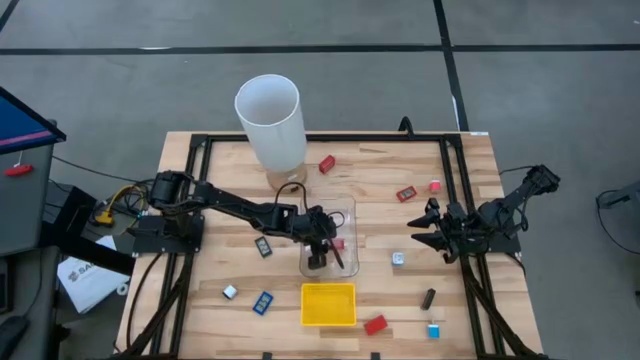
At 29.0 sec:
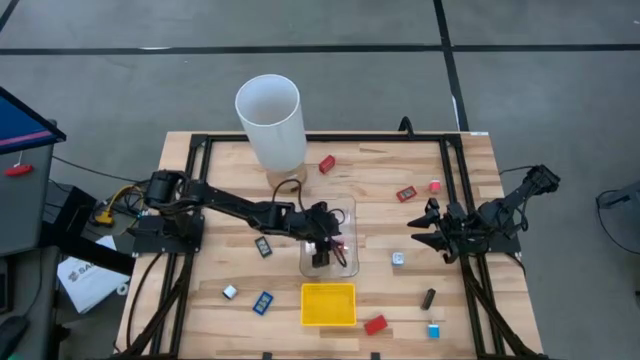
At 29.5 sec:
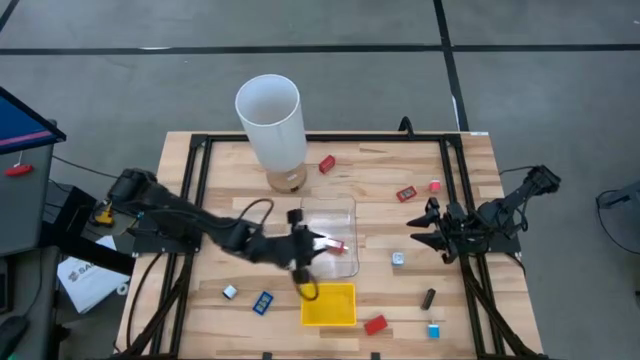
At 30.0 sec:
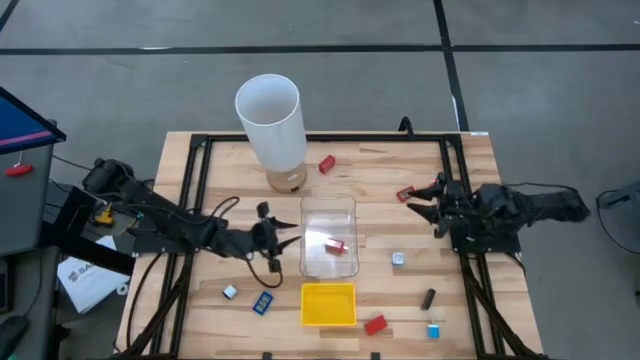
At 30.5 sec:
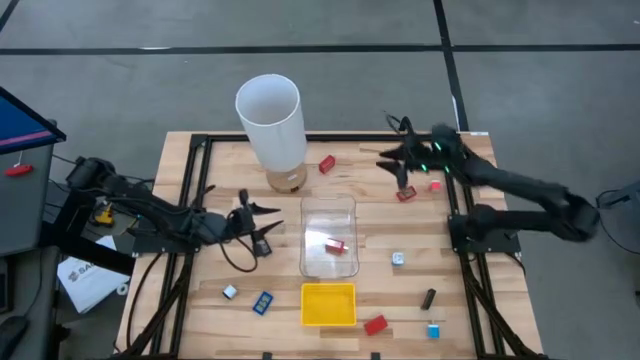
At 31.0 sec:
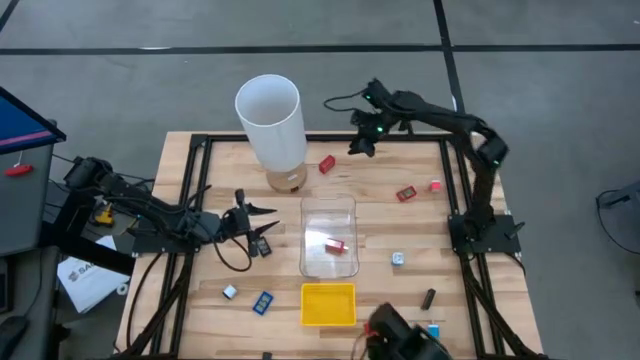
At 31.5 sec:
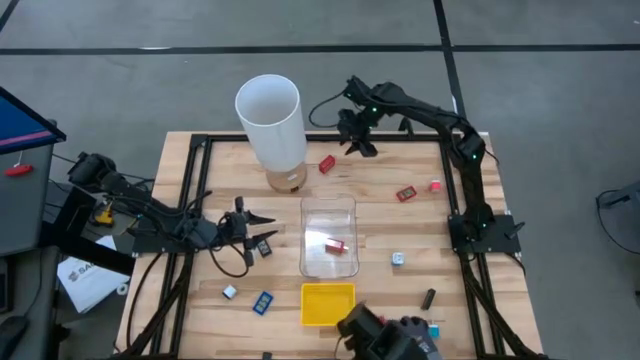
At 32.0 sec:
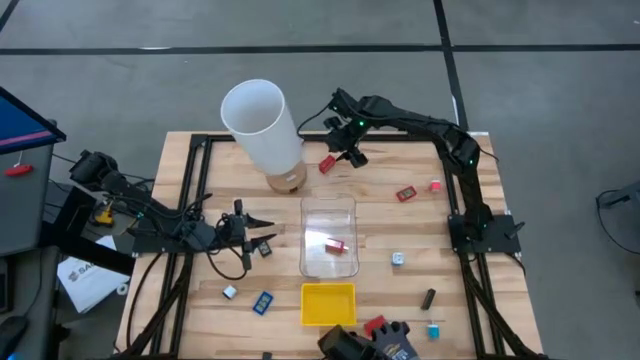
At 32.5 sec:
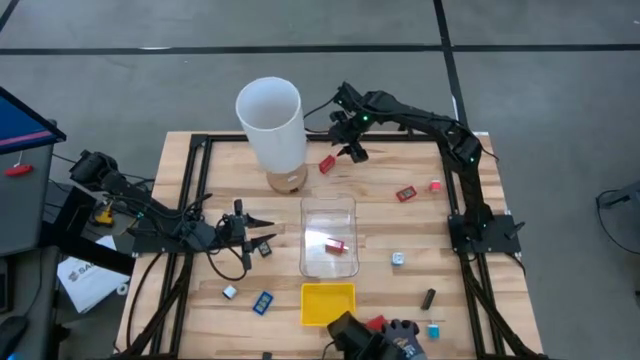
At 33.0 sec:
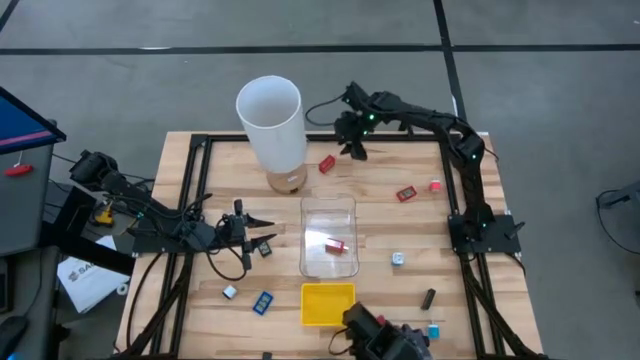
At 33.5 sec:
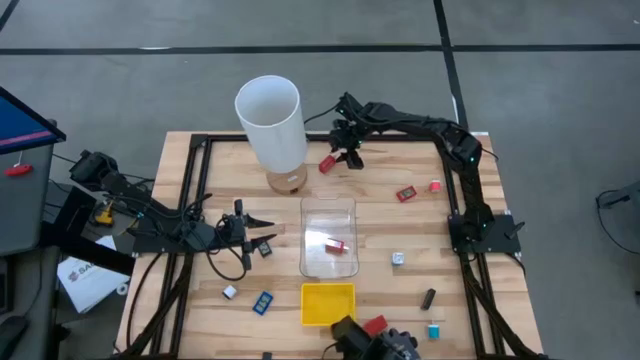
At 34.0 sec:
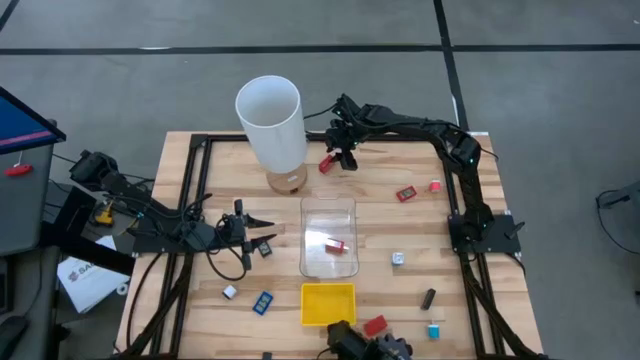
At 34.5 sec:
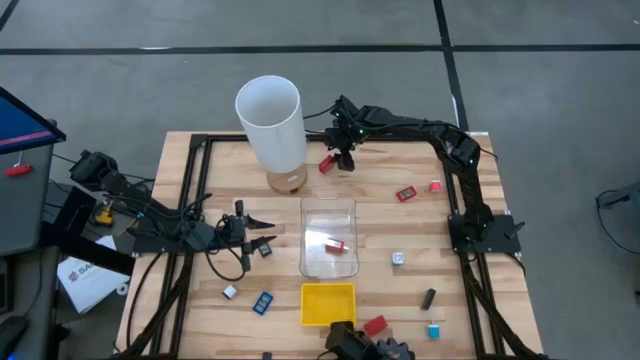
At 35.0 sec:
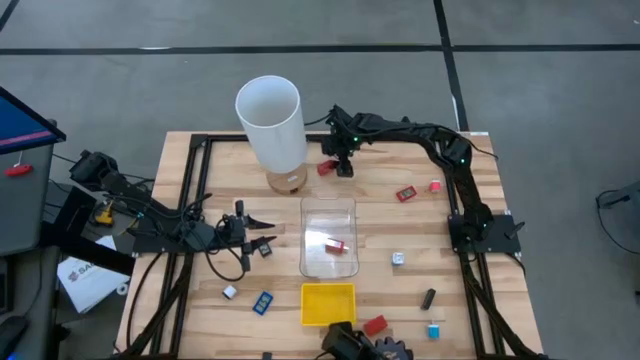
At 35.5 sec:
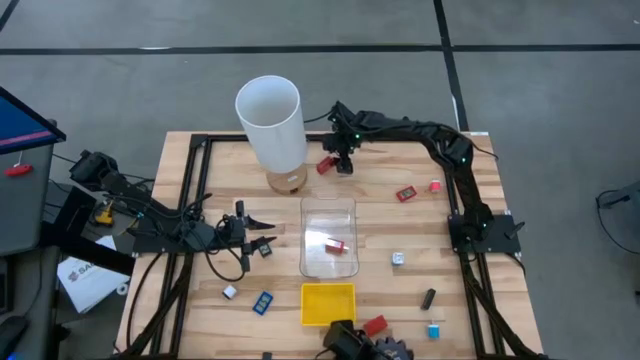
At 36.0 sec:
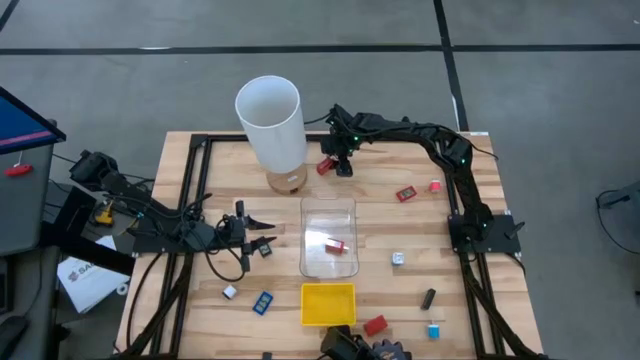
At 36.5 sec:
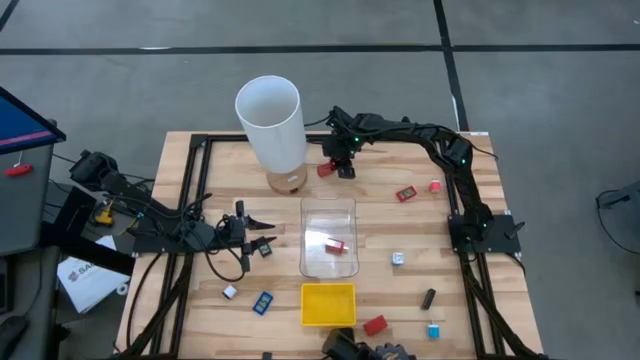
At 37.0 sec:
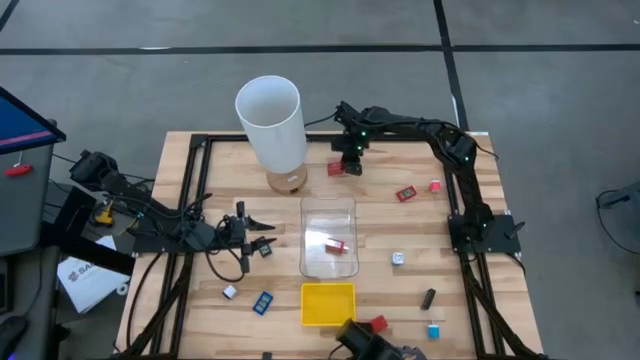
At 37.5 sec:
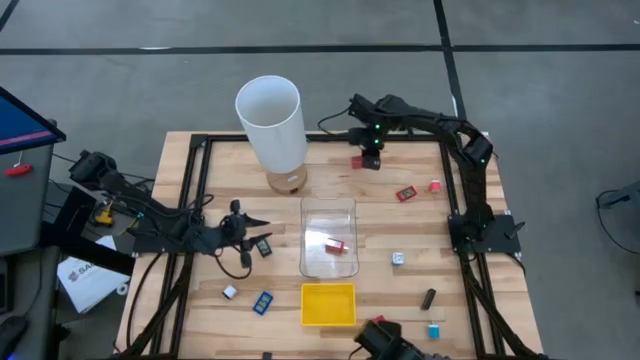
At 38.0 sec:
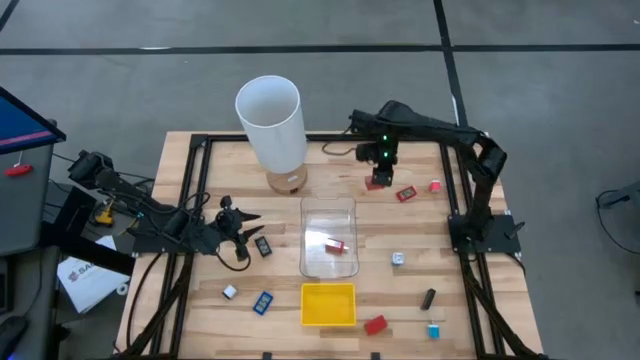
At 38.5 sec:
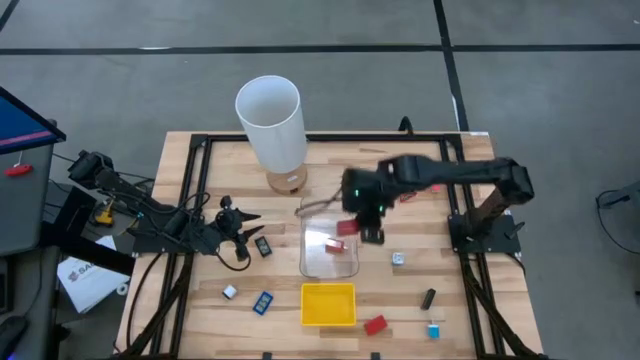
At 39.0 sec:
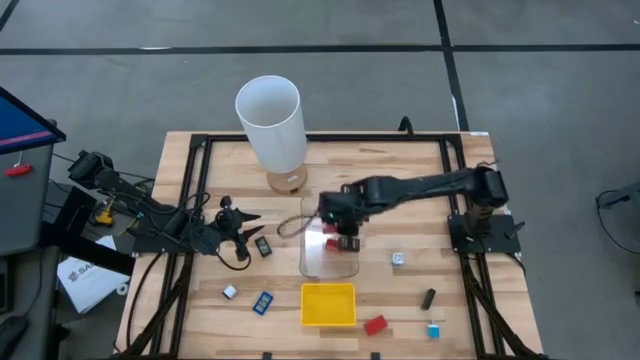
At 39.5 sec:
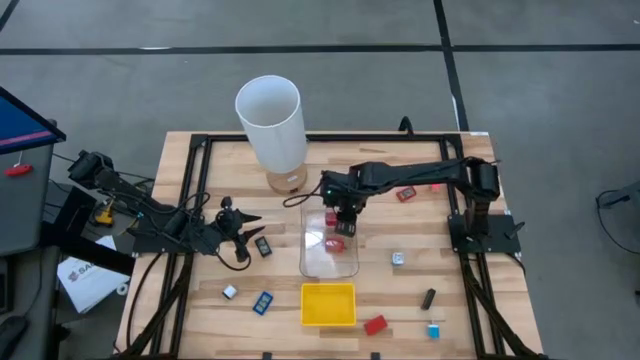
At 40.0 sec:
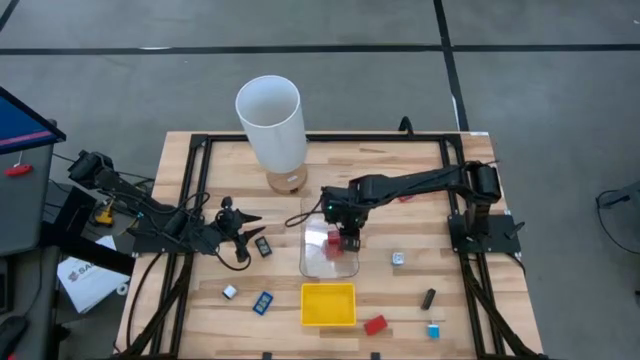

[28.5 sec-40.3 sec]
Task: Pick & Place Office items
Put the red charger adapter into the transparent bin

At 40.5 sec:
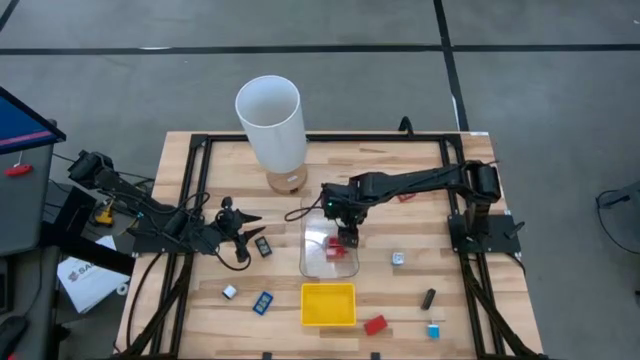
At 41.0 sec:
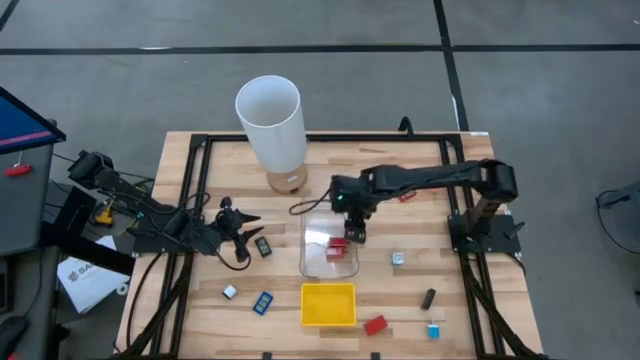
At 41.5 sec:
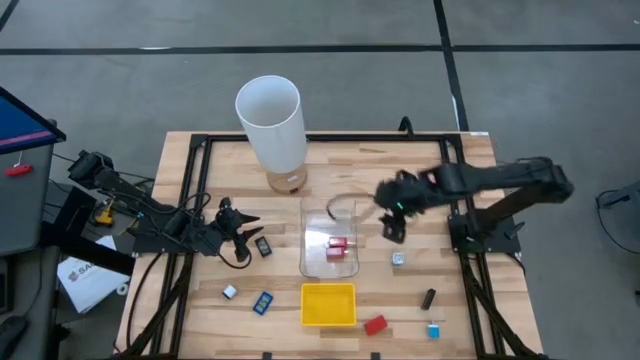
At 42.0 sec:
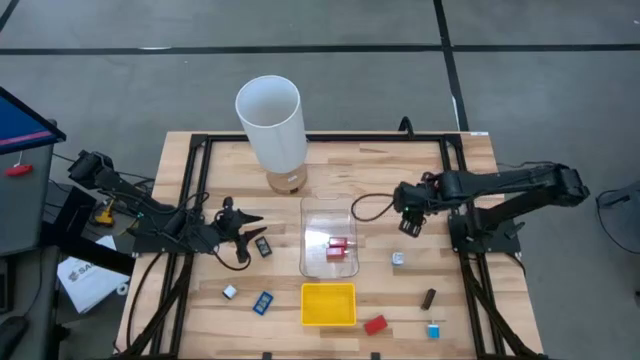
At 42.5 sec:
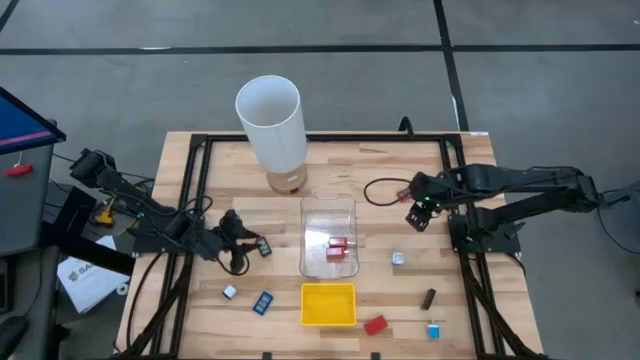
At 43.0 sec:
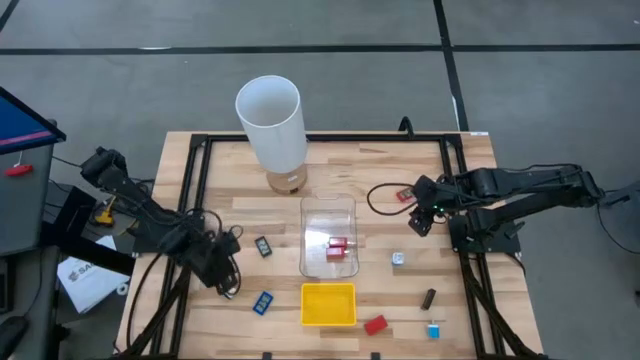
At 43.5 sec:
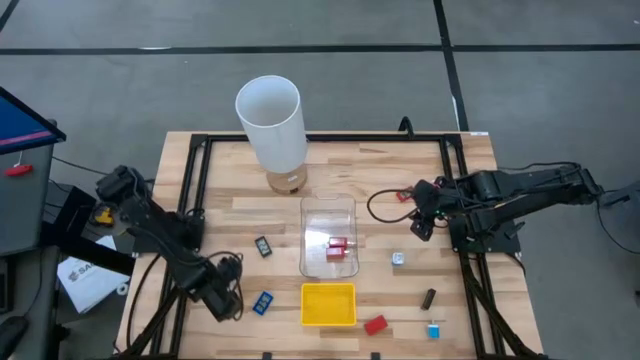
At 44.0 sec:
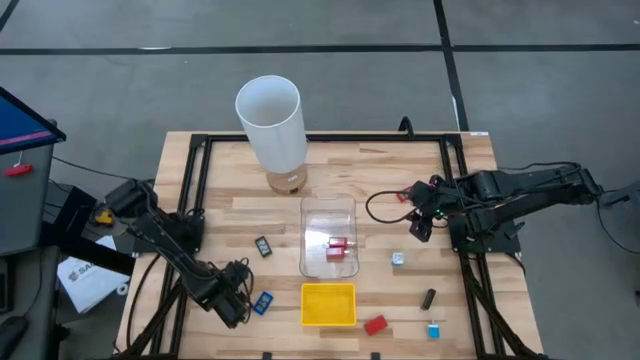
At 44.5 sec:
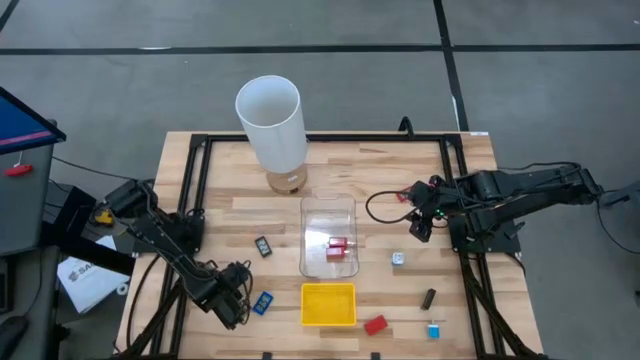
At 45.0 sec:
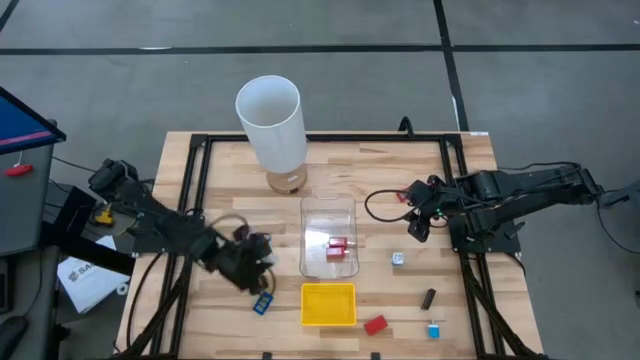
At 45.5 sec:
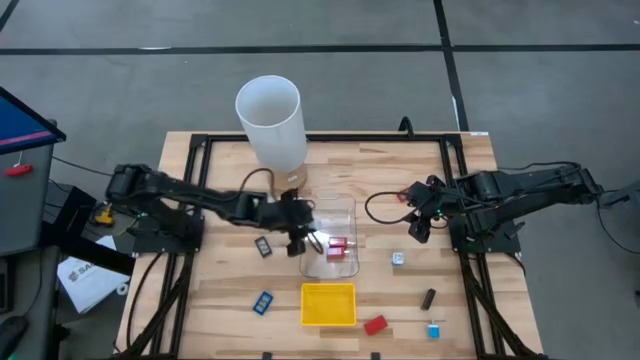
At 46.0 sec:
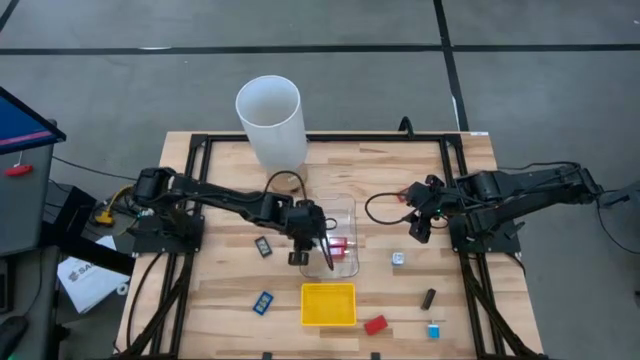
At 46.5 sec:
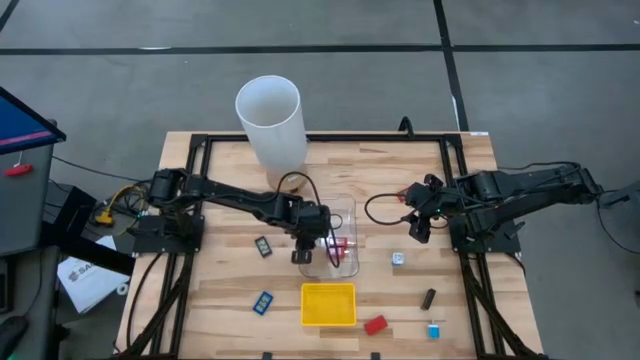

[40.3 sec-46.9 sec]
Put the white charger adapter into the transparent bin

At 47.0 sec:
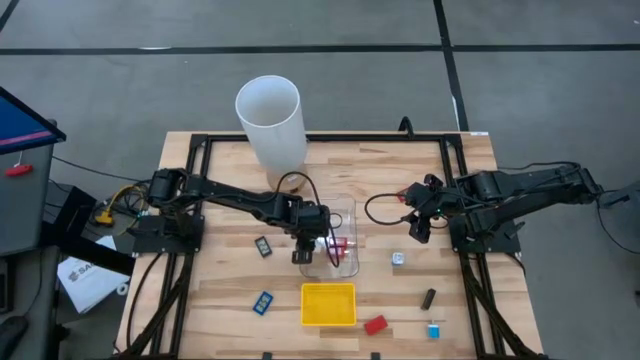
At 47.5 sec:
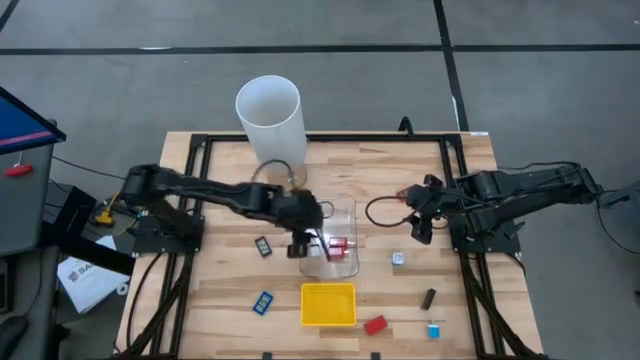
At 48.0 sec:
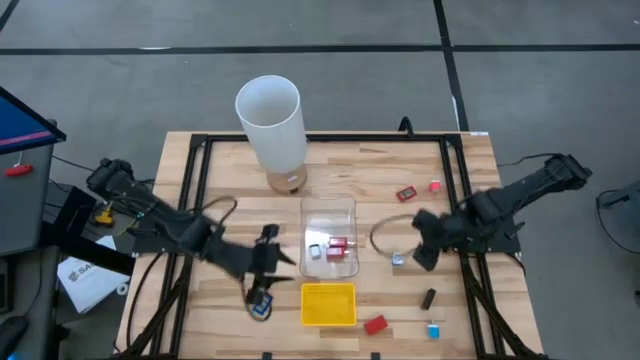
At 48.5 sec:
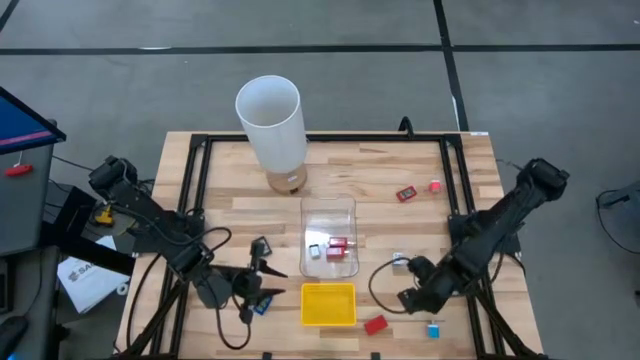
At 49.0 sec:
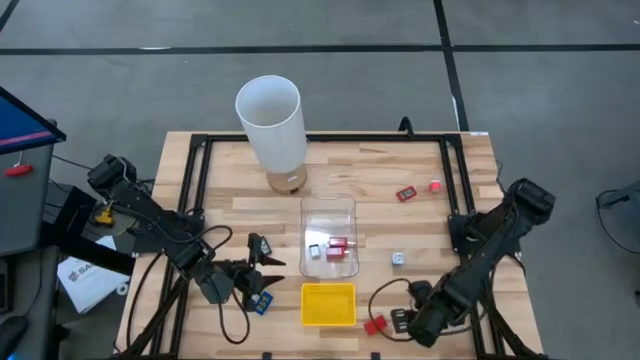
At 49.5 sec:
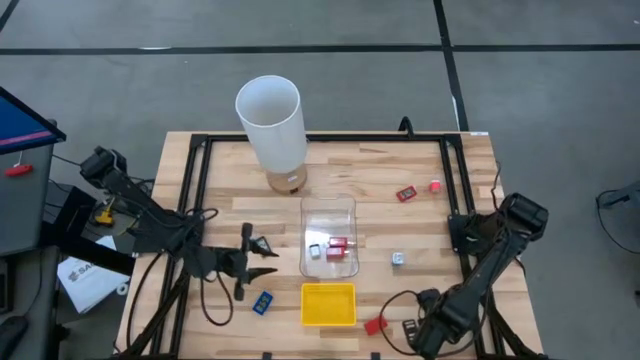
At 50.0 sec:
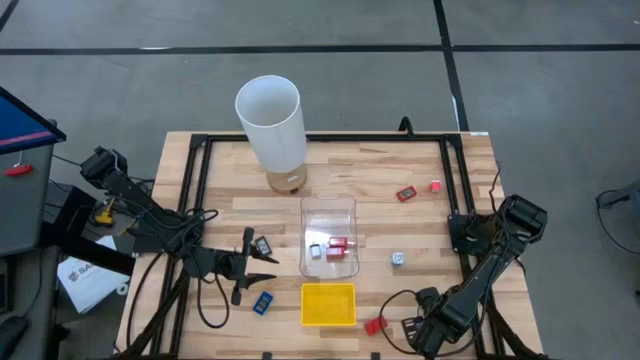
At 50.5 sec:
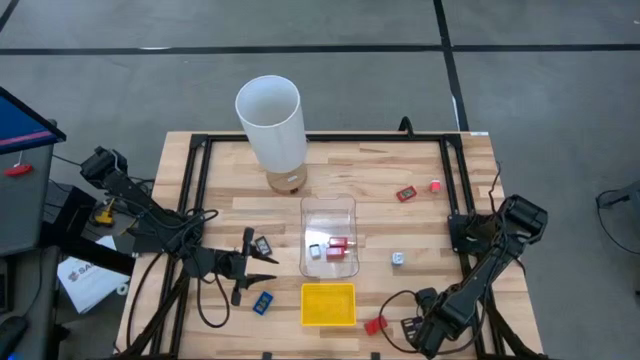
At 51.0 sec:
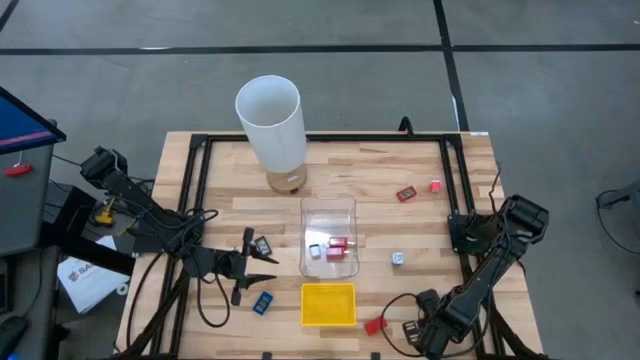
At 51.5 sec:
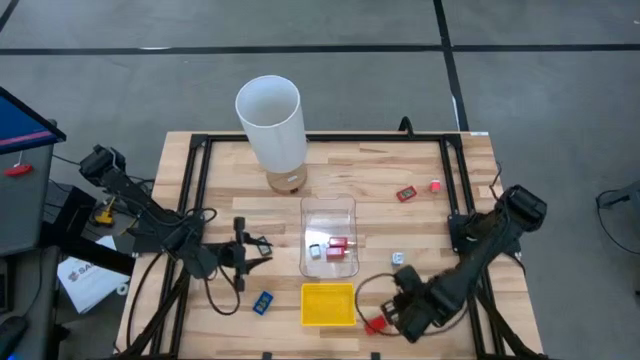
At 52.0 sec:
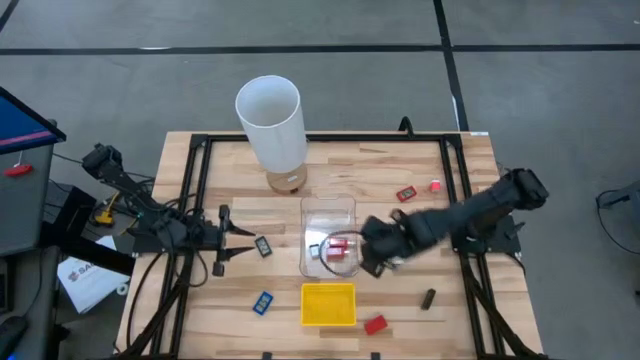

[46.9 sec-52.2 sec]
Put the bottom blue charger adapter into the transparent bin
